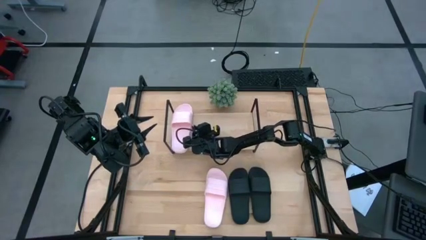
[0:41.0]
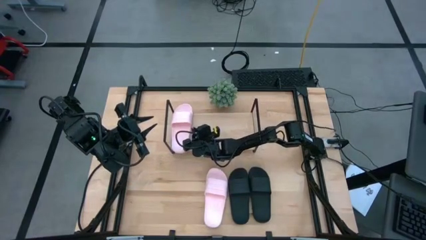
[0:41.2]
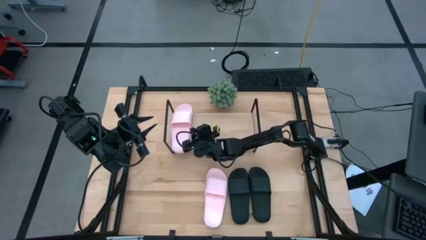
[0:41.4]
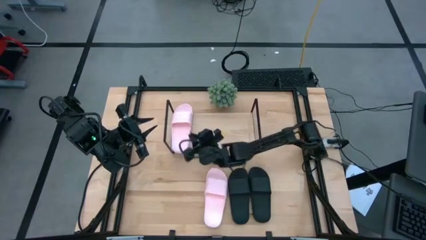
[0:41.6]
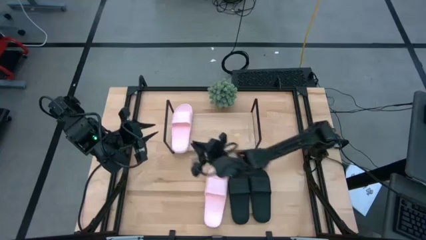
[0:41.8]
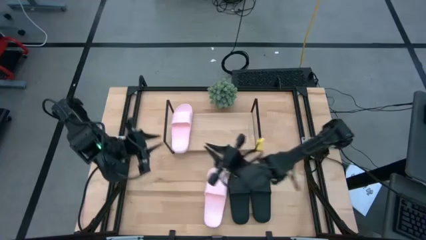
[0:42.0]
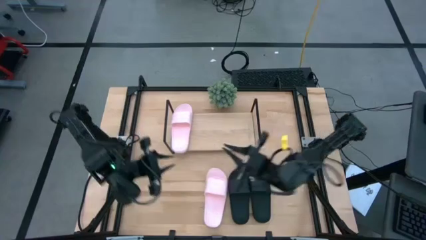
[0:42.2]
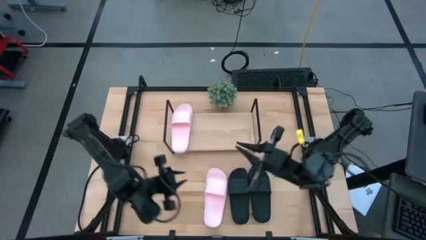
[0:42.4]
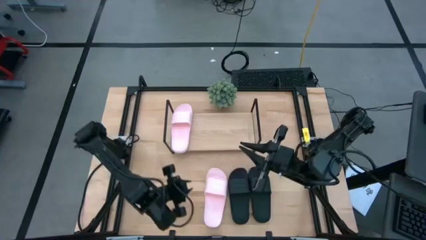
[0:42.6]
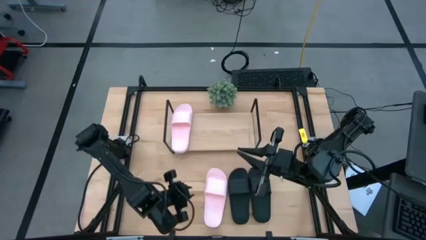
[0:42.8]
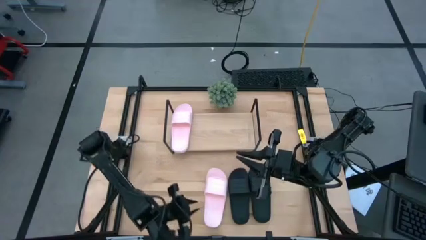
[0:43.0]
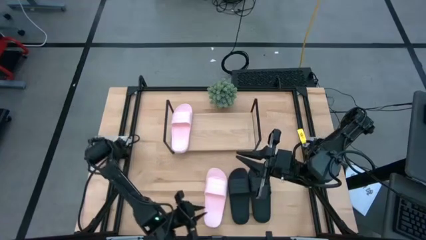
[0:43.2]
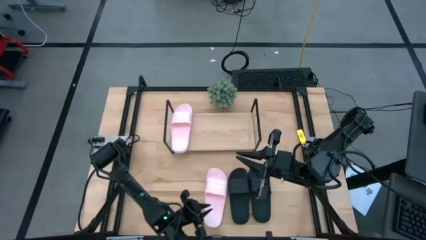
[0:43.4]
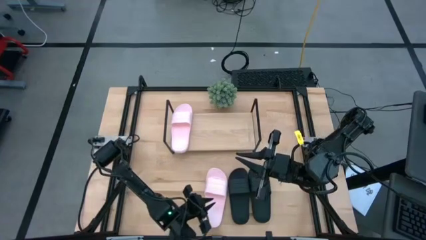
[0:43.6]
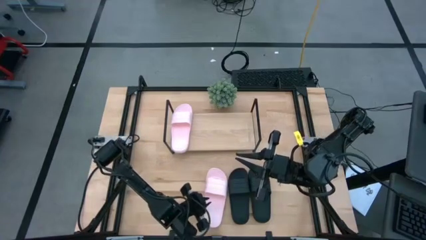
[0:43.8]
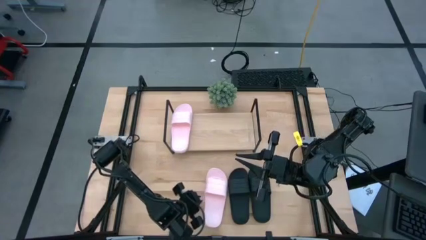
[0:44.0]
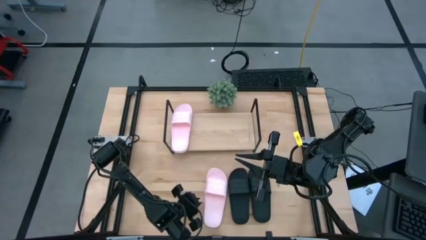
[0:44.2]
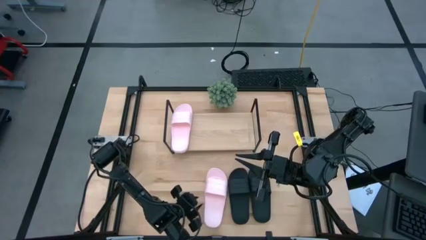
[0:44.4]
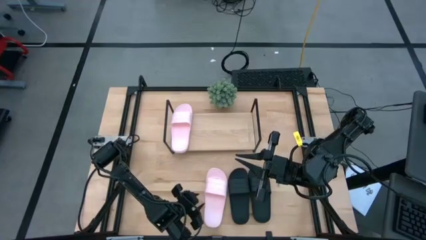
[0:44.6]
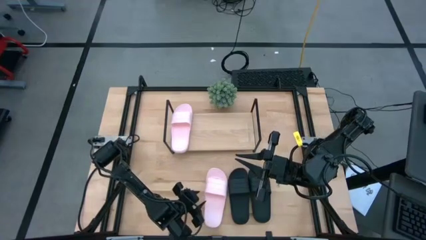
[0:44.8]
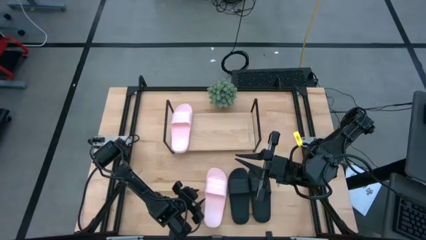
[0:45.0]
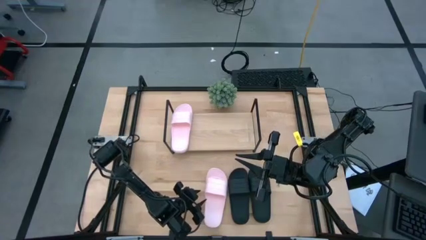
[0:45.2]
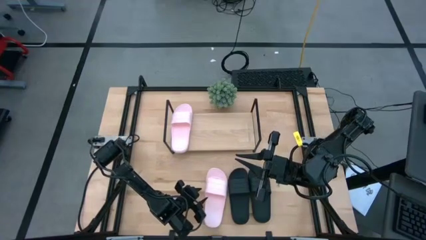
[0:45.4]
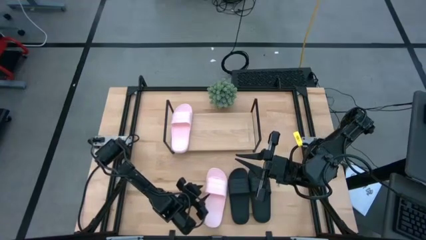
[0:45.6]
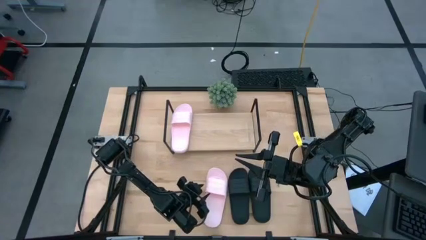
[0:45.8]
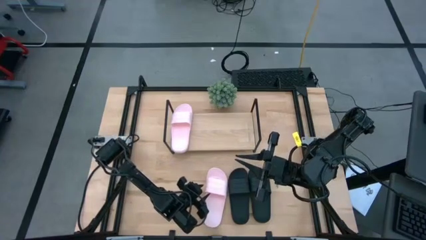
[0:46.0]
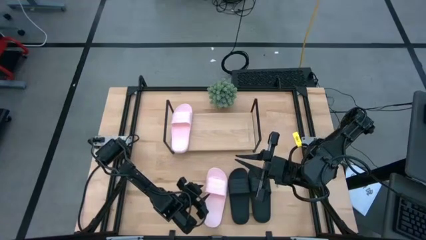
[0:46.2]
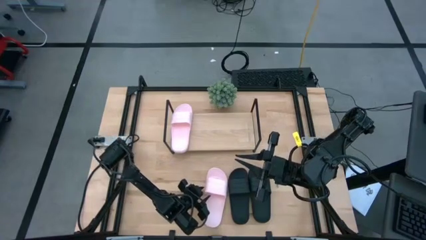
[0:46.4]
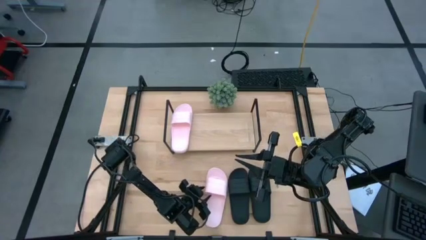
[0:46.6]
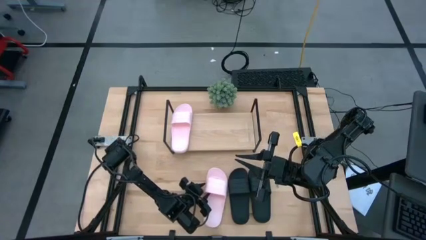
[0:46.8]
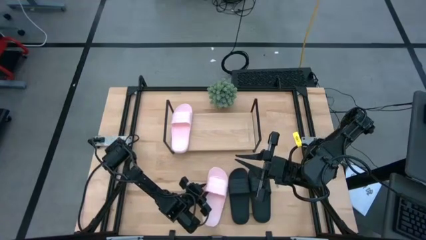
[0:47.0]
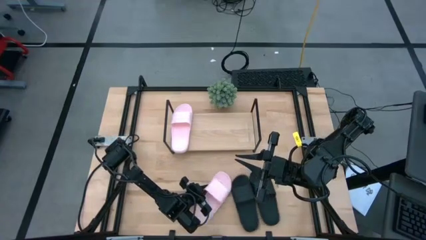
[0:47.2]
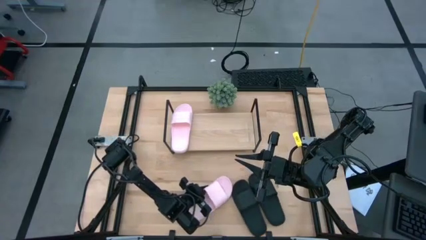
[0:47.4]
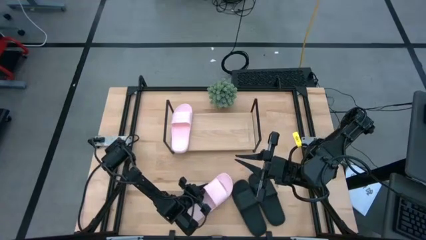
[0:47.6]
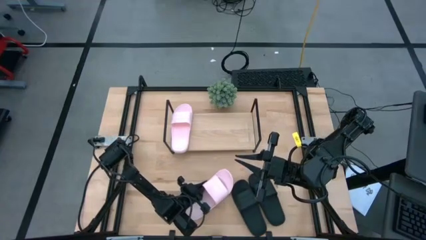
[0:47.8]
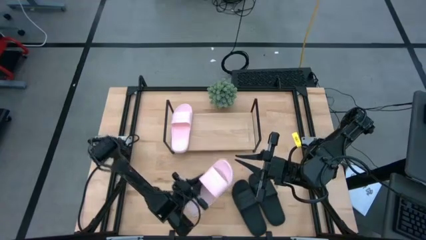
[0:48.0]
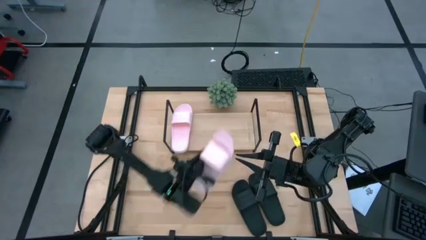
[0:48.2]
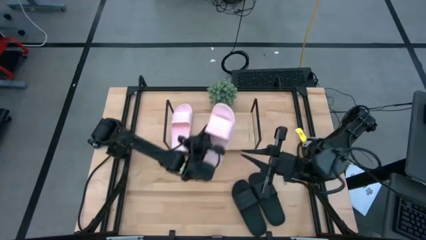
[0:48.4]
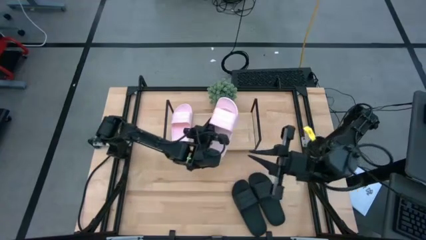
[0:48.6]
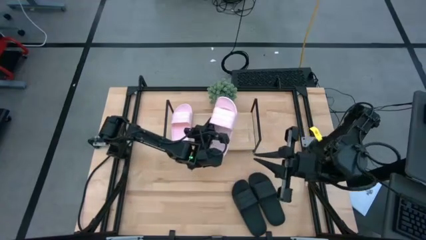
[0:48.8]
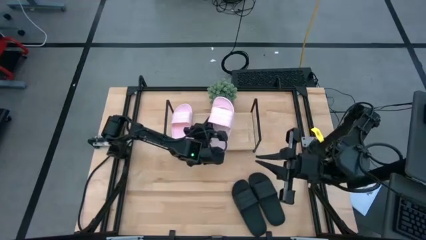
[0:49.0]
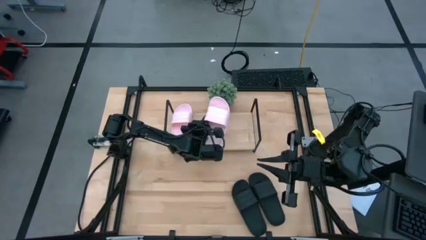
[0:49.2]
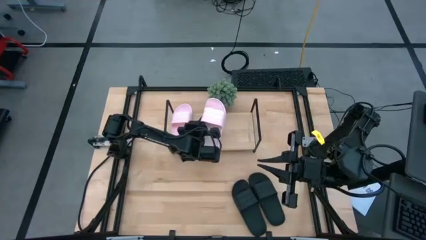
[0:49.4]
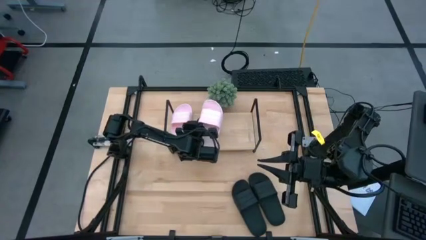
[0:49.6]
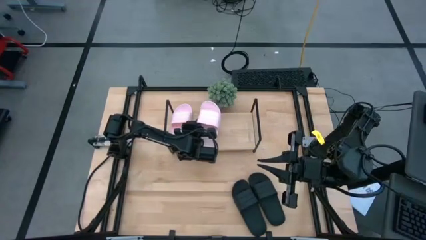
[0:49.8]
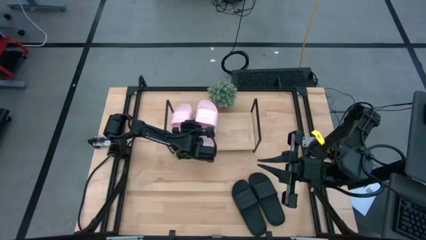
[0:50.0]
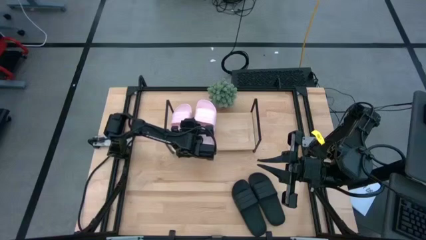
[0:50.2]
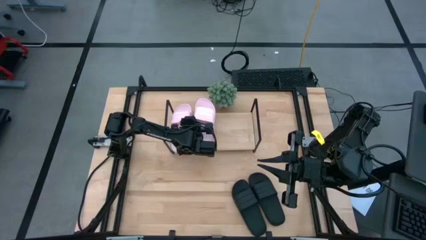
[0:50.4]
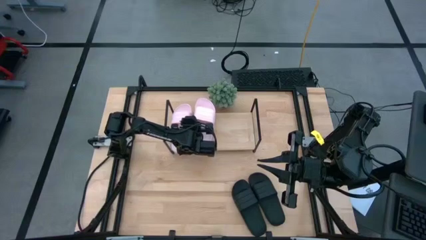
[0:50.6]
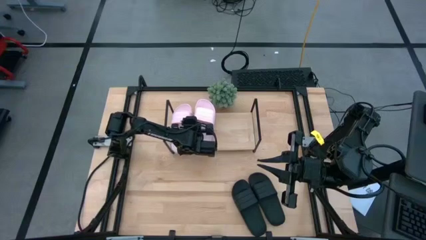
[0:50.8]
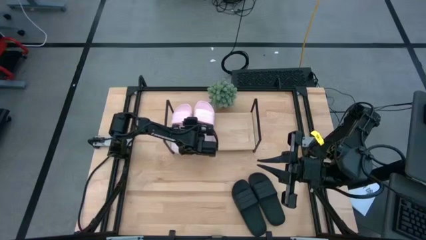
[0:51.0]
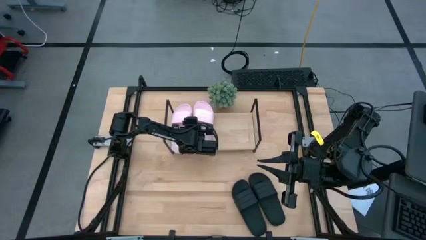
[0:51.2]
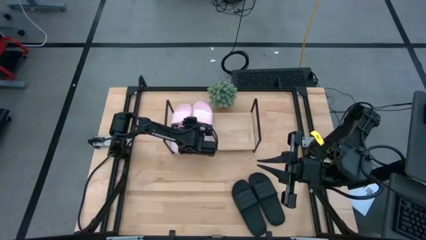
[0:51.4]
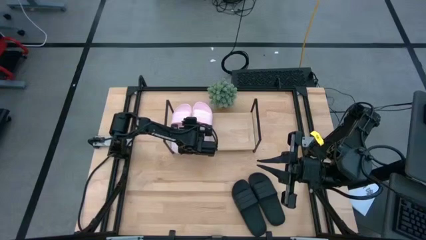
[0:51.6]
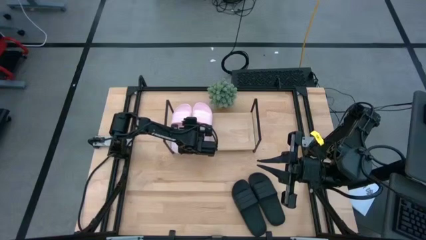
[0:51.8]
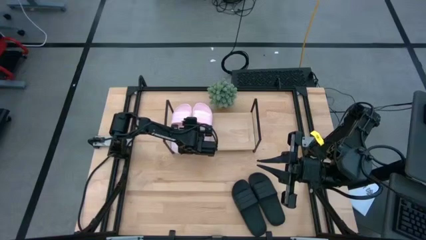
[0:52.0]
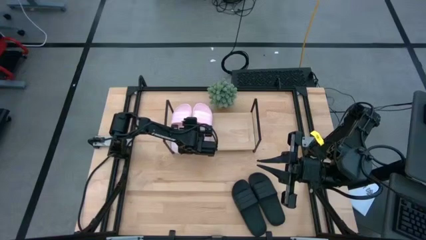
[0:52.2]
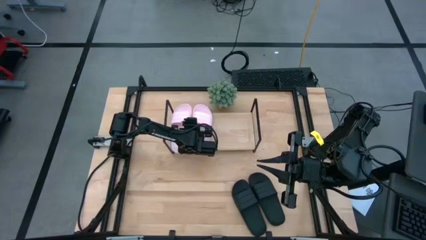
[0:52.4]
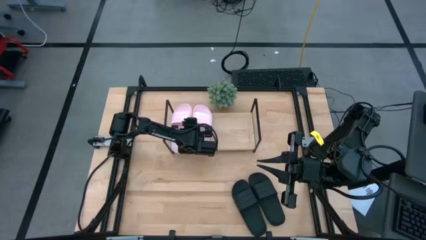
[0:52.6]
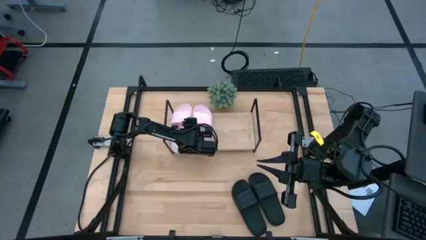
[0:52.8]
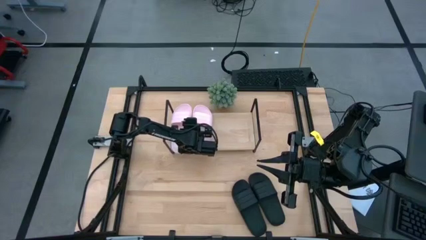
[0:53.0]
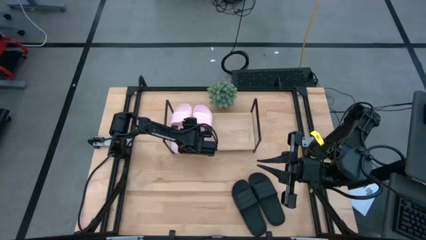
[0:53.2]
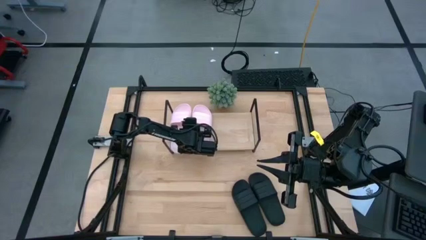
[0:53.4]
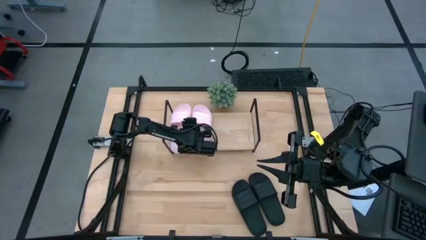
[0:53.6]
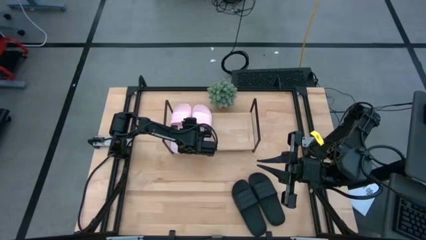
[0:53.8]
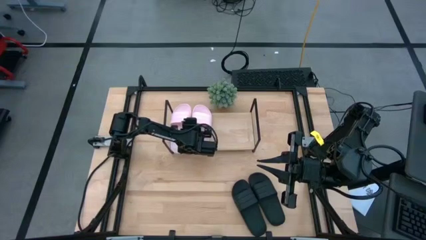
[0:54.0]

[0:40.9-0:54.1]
Task: Pick and place slides into the shelf
Put the pink slide on the shelf
